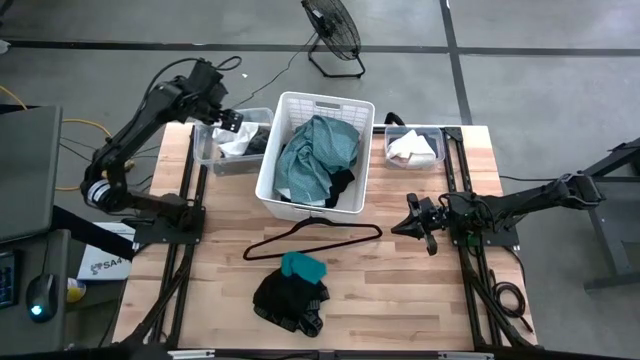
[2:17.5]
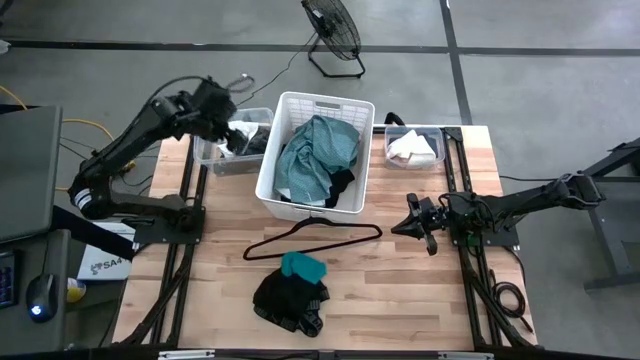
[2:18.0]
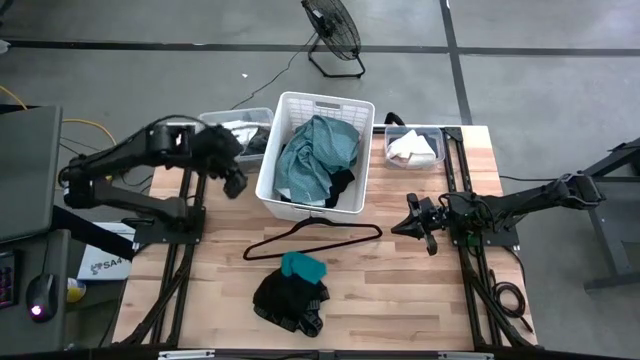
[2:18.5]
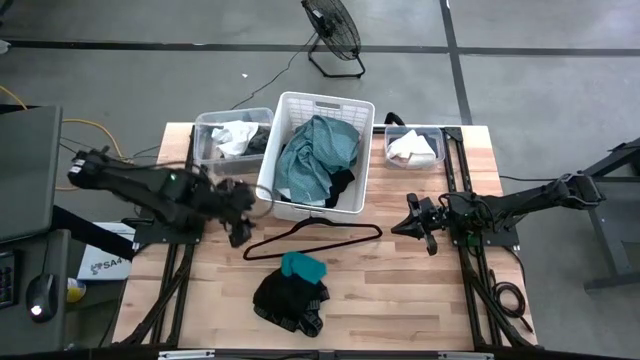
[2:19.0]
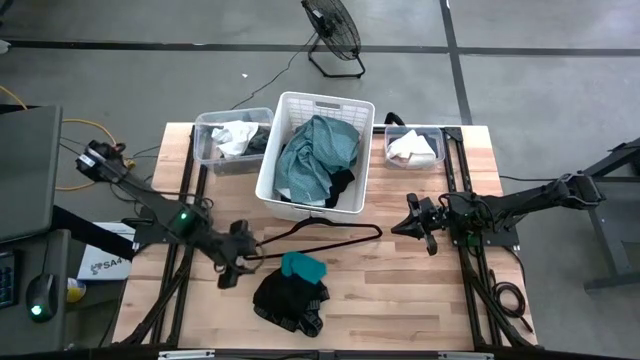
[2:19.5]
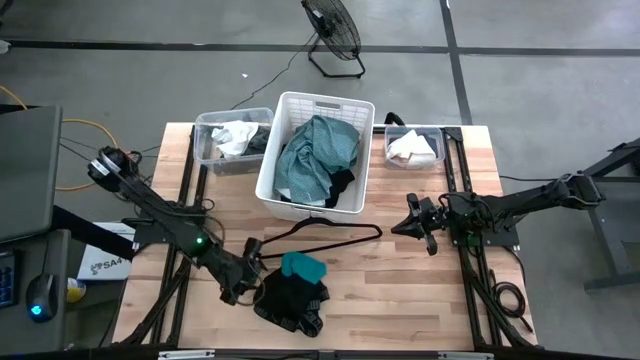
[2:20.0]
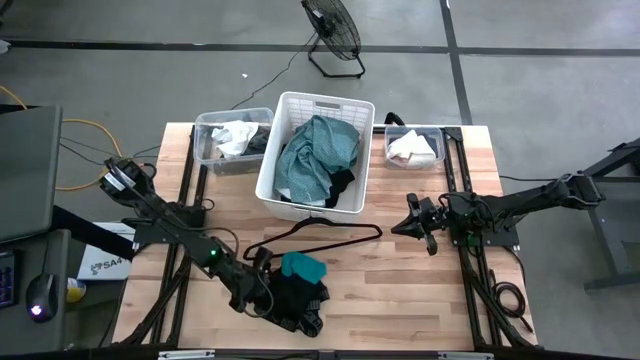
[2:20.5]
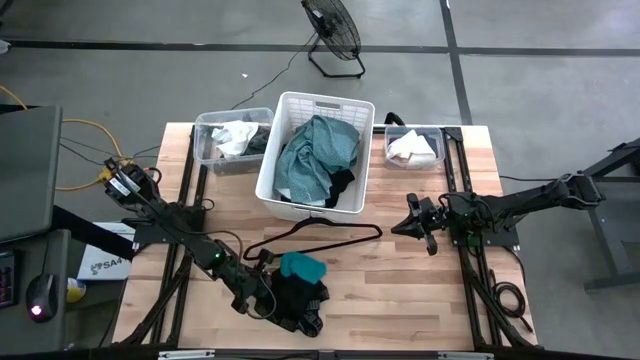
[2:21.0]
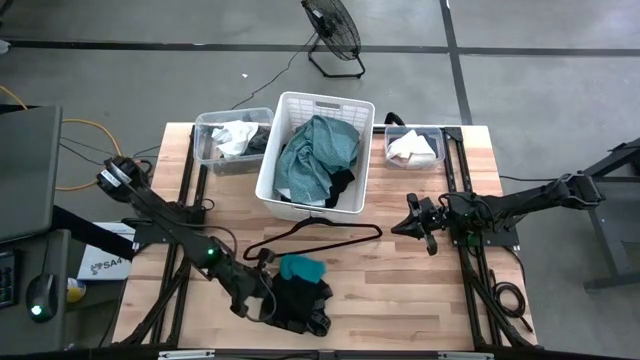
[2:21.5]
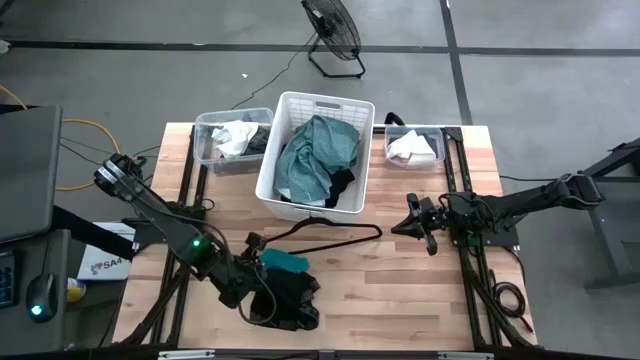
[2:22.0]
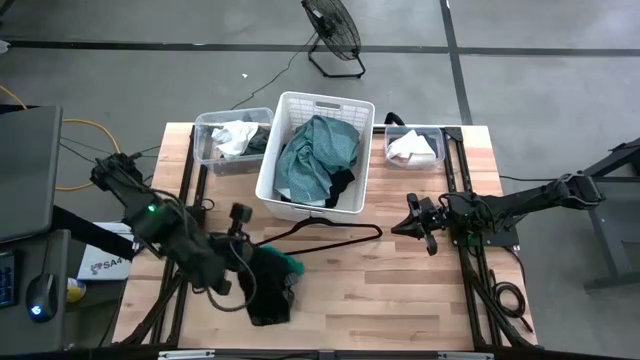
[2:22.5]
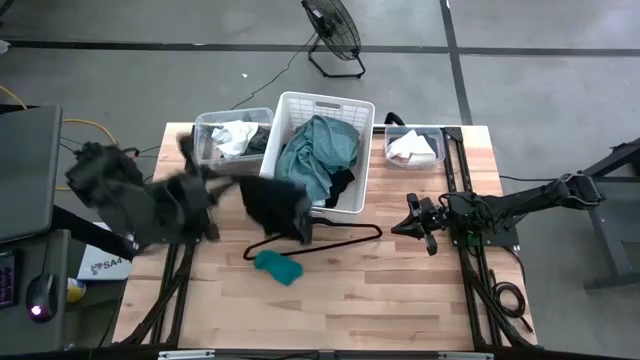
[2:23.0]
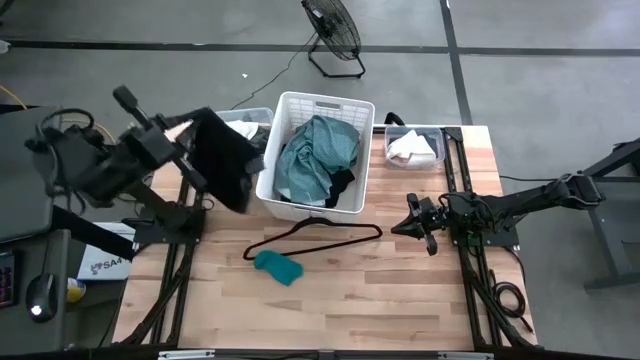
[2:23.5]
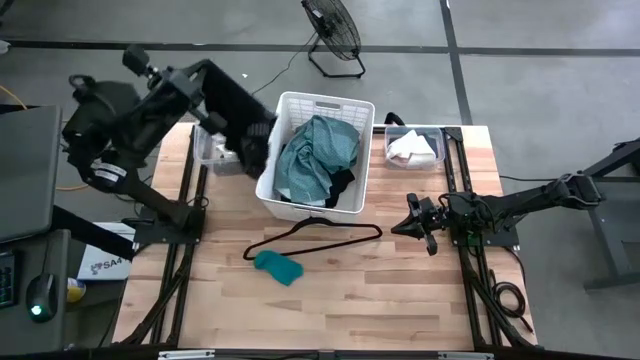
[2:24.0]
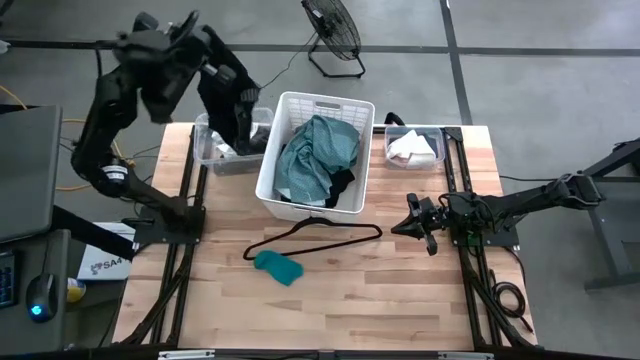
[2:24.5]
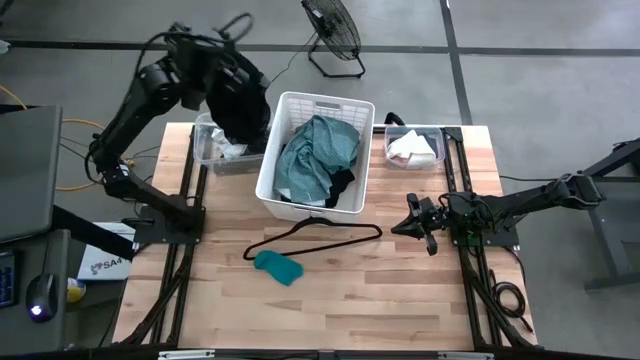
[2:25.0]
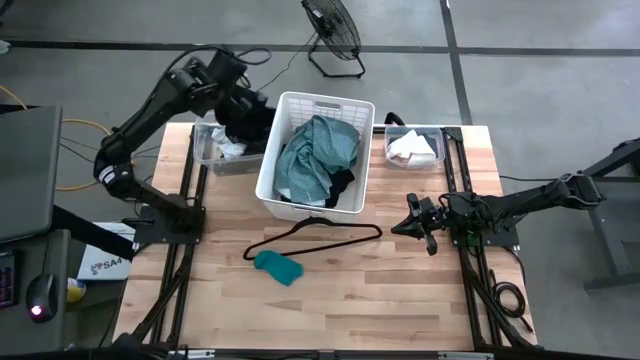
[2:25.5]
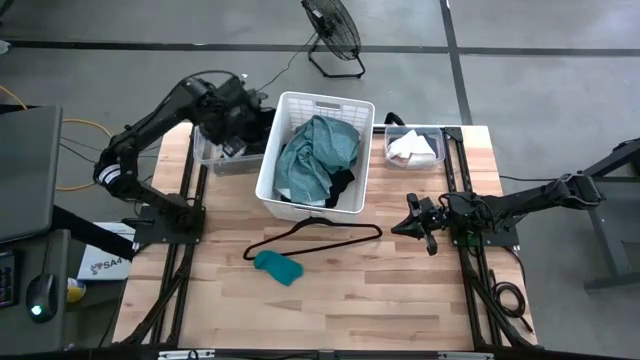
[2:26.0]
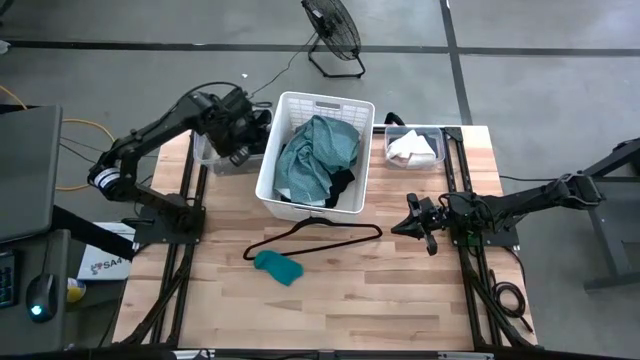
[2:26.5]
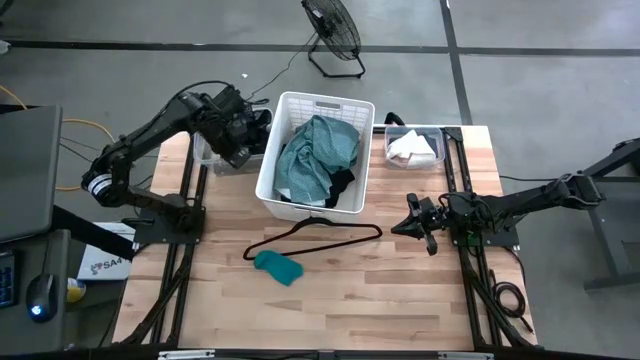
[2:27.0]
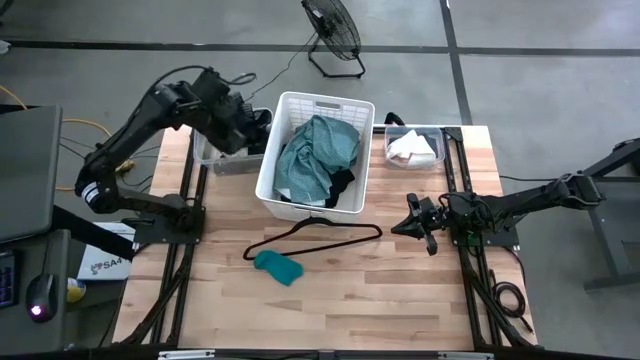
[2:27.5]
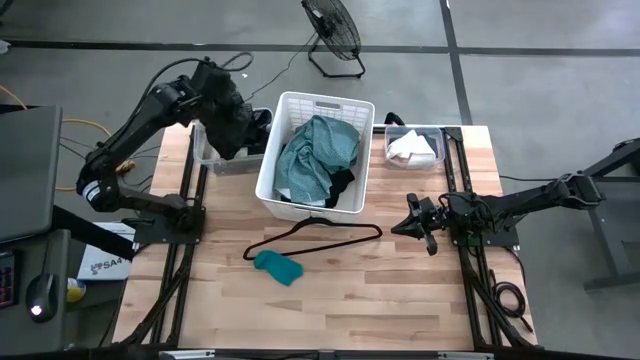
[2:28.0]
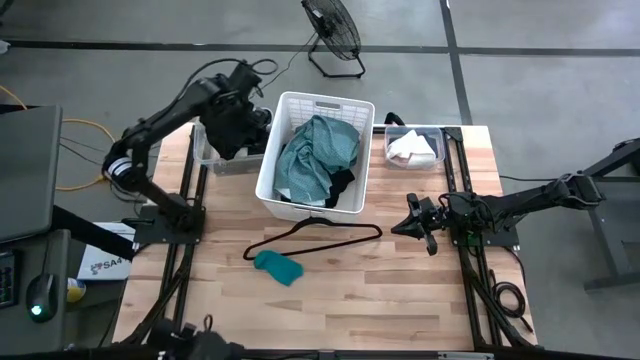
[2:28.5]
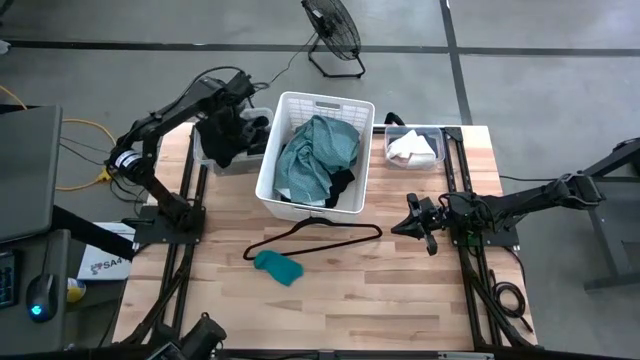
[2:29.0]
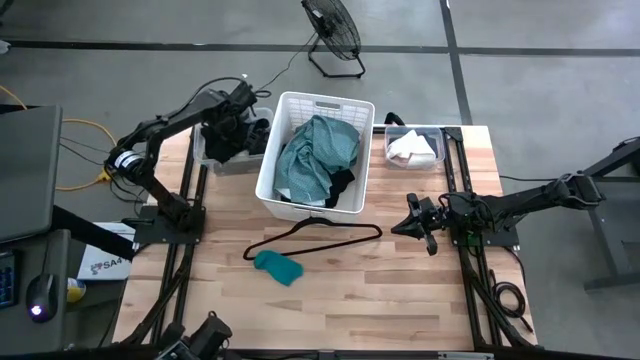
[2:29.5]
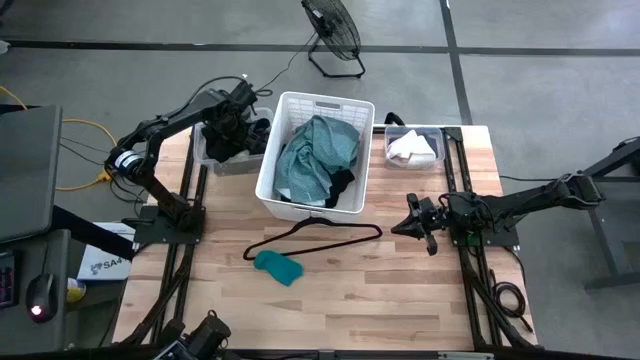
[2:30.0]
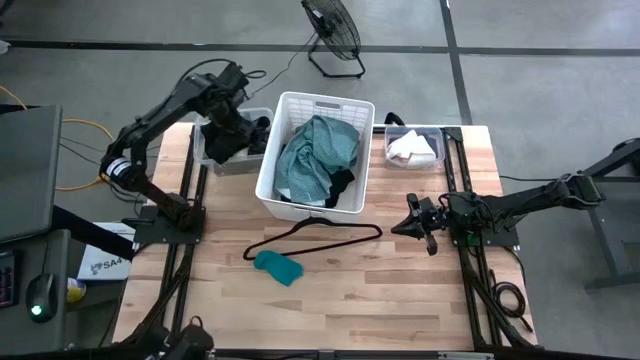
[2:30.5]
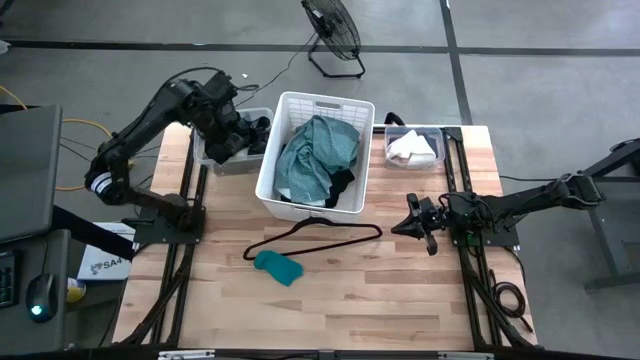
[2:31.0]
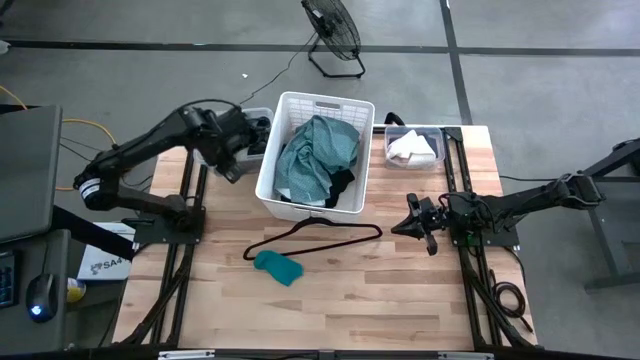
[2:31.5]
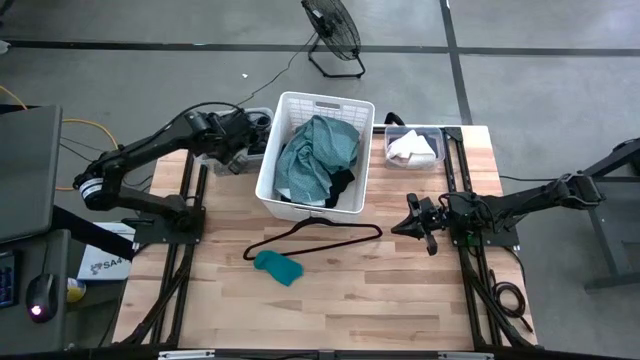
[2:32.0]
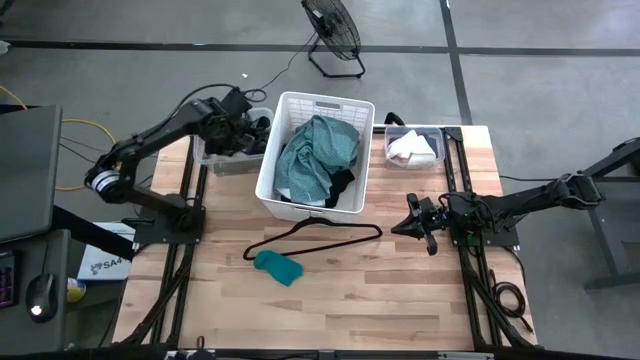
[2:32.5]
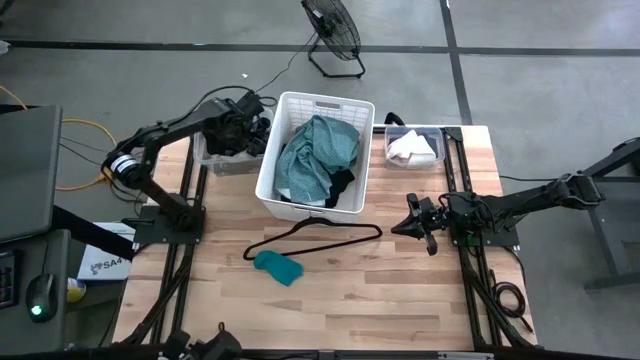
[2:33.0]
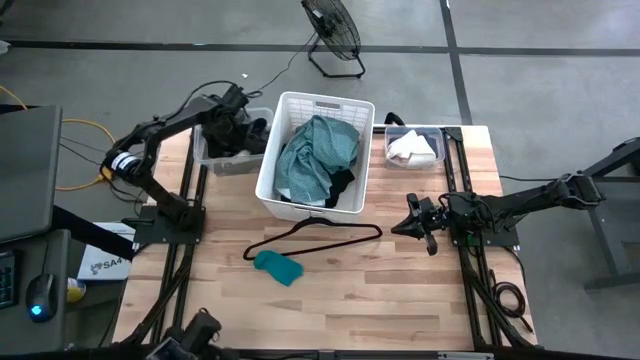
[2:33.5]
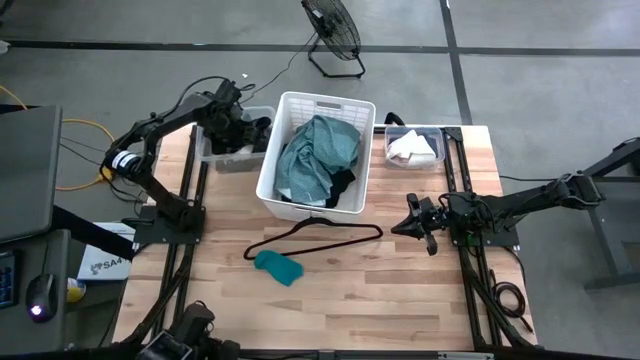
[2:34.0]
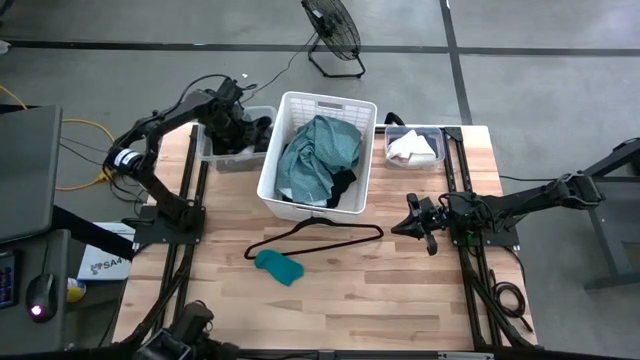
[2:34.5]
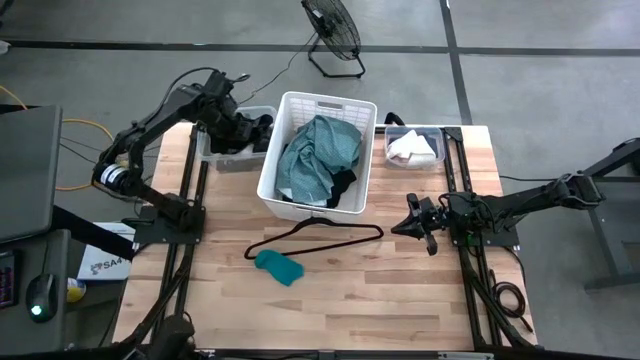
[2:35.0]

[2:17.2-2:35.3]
Task: Pick & Place Cloths
Put the black boxer shorts into the left transparent bin

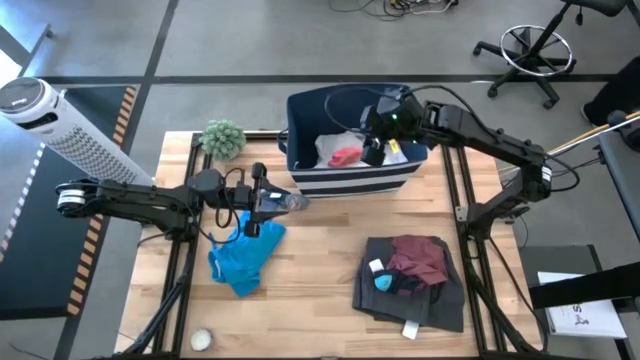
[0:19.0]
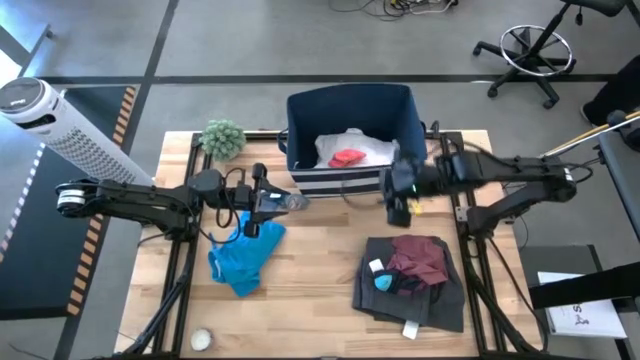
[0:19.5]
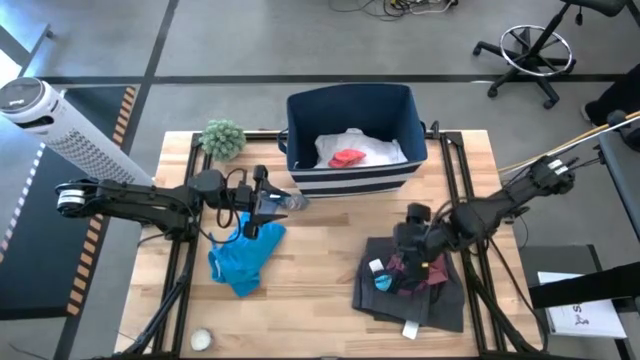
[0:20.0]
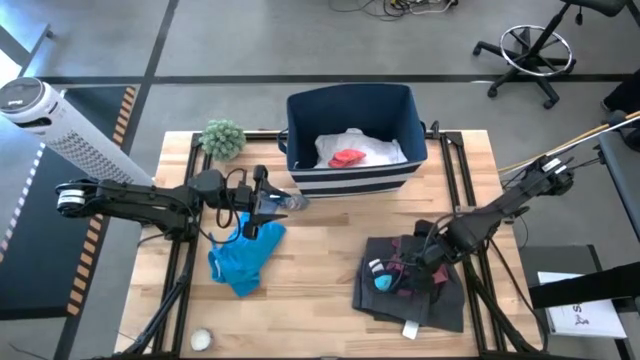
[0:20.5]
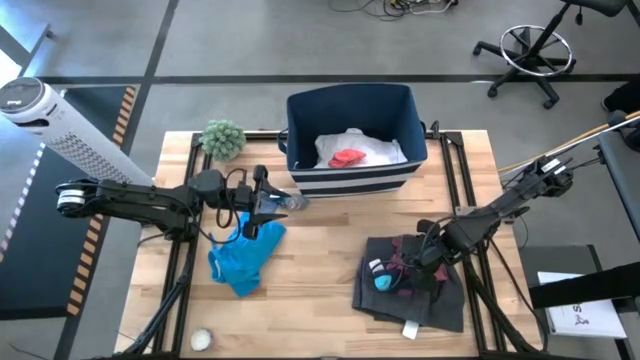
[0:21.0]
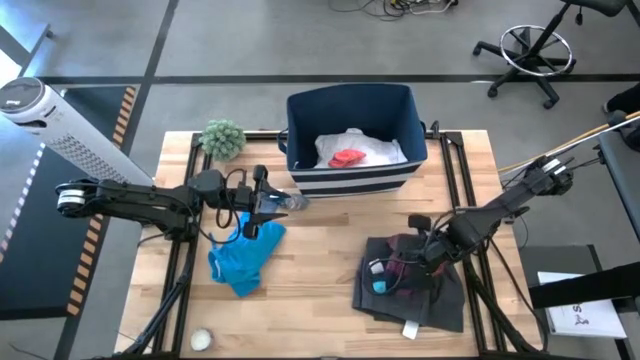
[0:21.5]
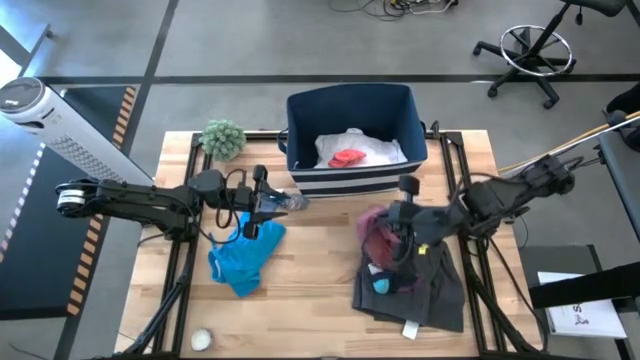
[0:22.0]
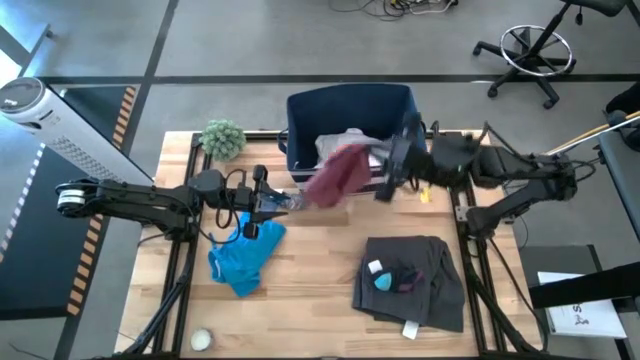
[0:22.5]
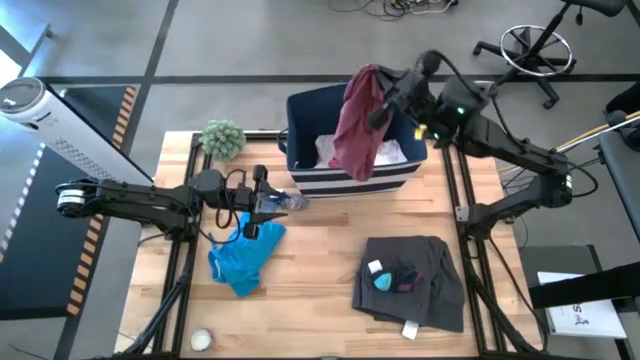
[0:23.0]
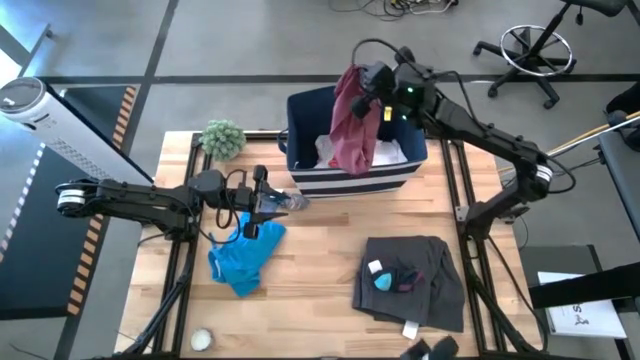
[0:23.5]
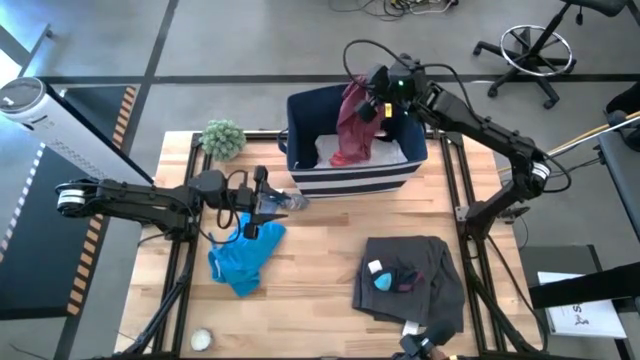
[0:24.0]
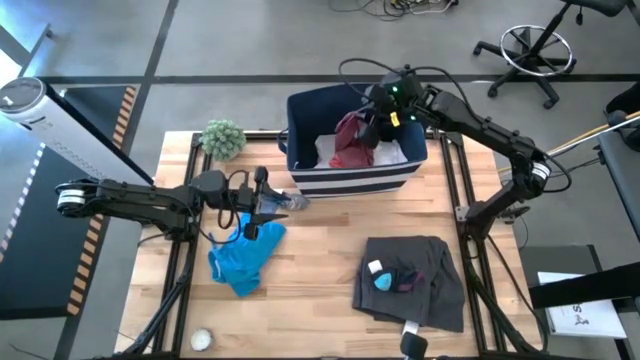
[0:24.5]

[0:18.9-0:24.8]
Task: Sort clothes
Put the red underwear into the blue laundry bin
